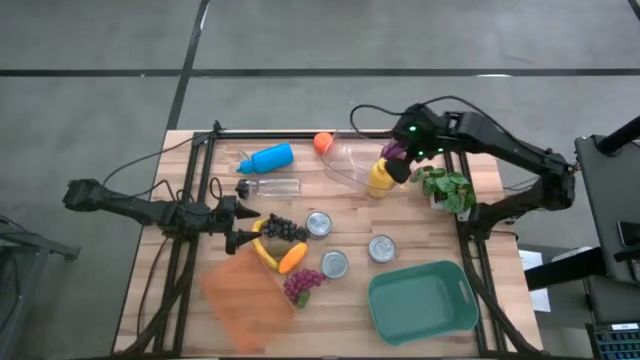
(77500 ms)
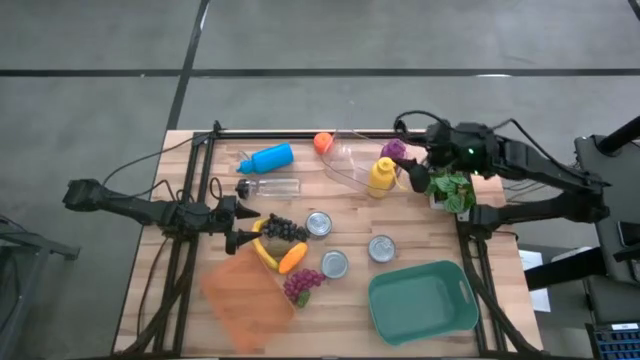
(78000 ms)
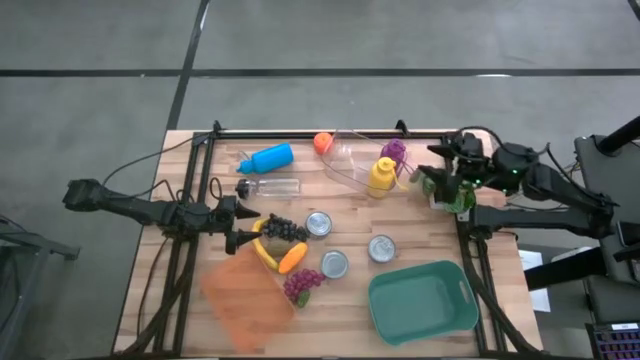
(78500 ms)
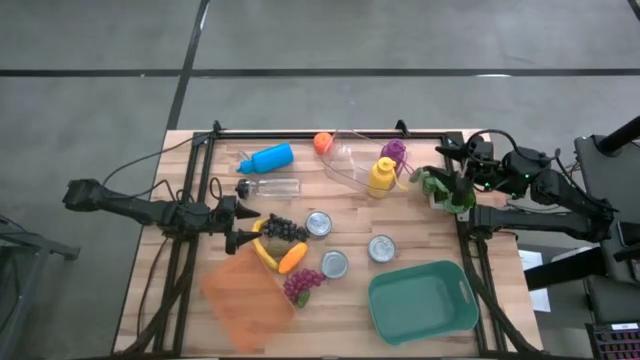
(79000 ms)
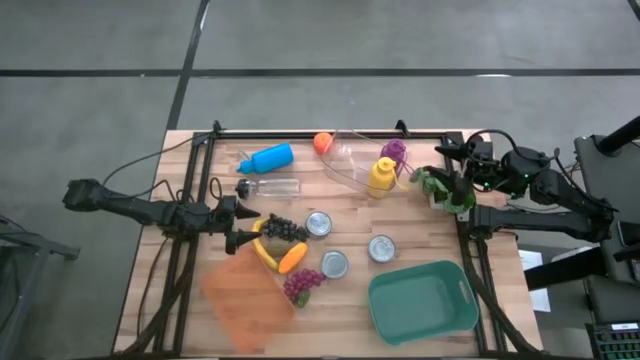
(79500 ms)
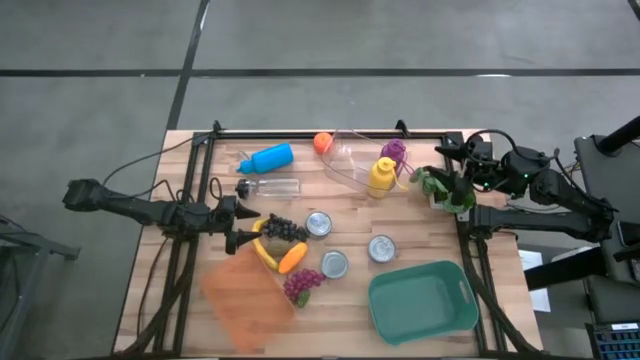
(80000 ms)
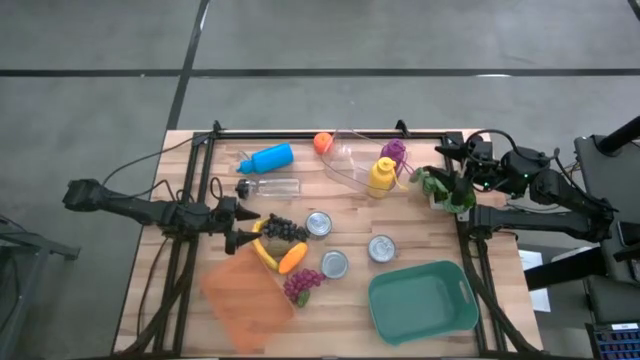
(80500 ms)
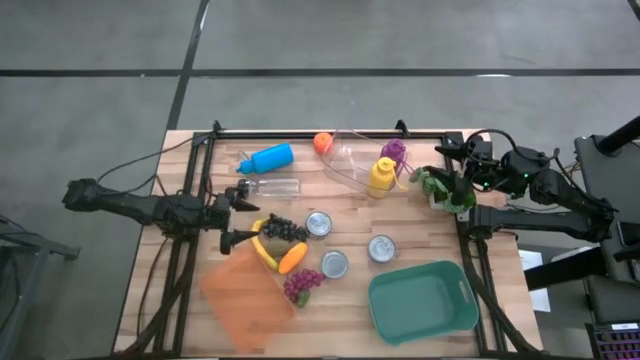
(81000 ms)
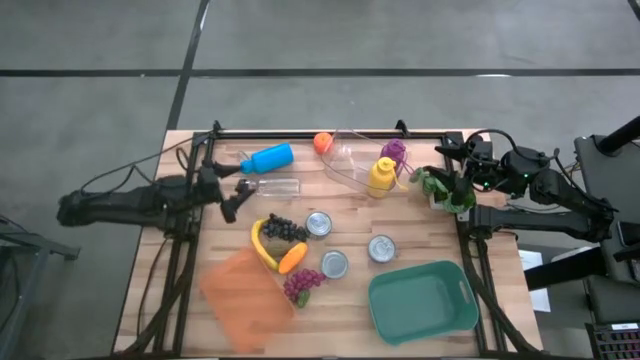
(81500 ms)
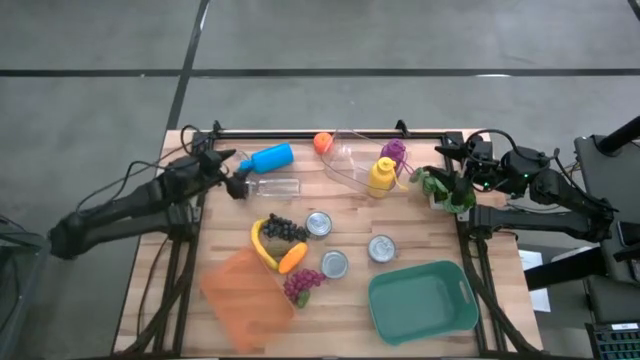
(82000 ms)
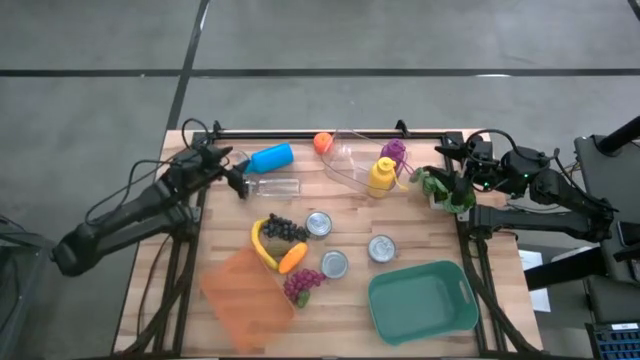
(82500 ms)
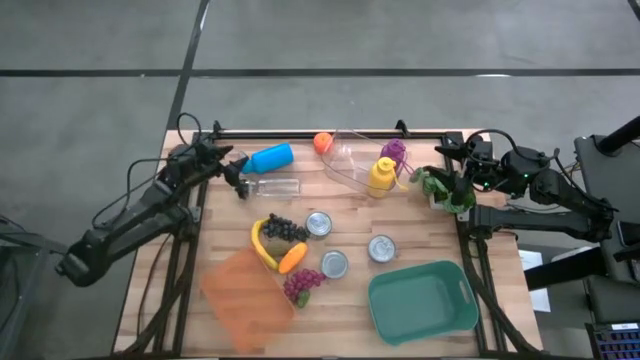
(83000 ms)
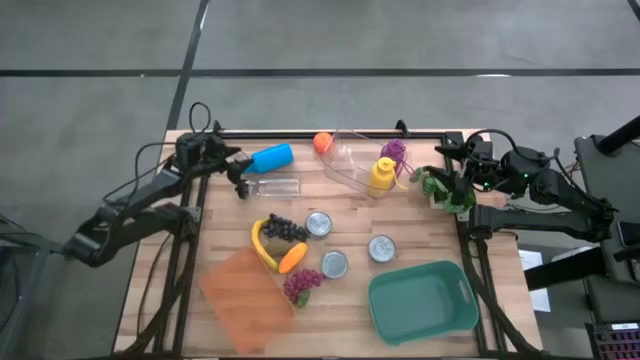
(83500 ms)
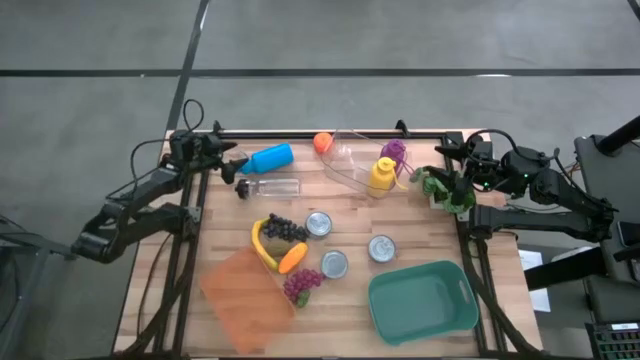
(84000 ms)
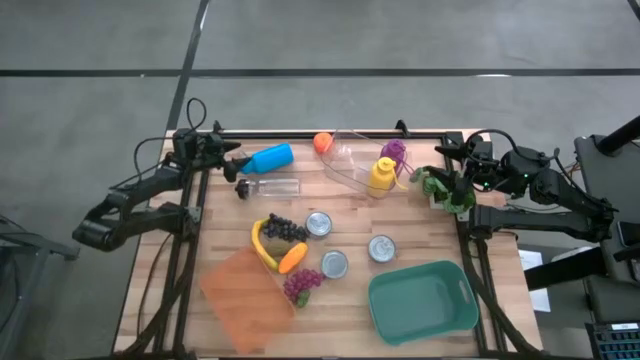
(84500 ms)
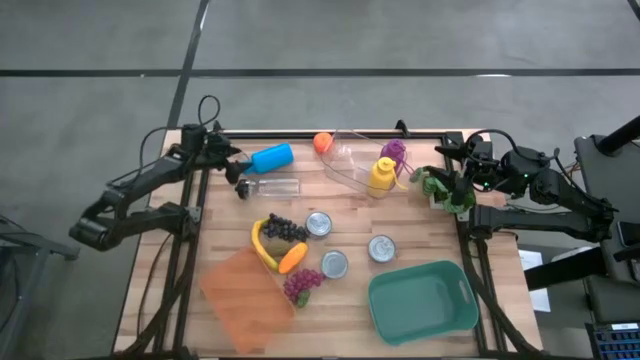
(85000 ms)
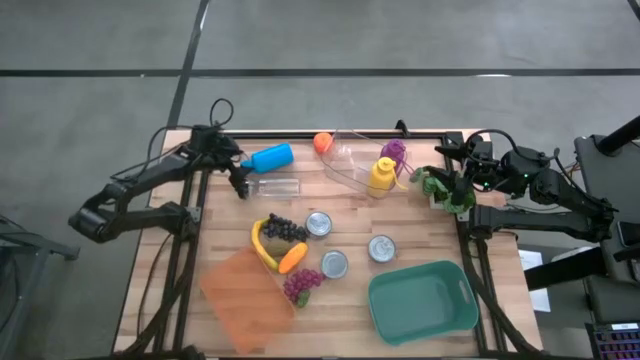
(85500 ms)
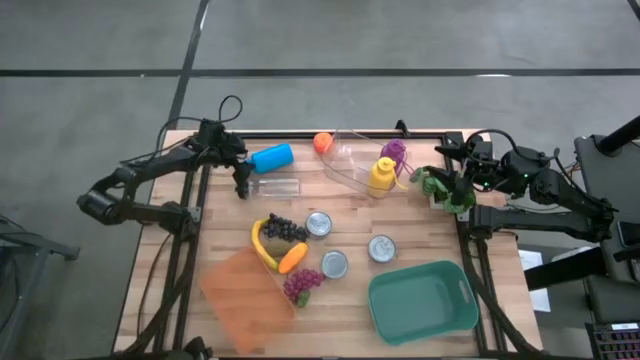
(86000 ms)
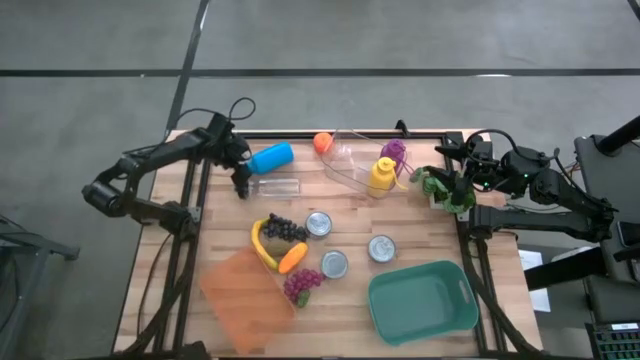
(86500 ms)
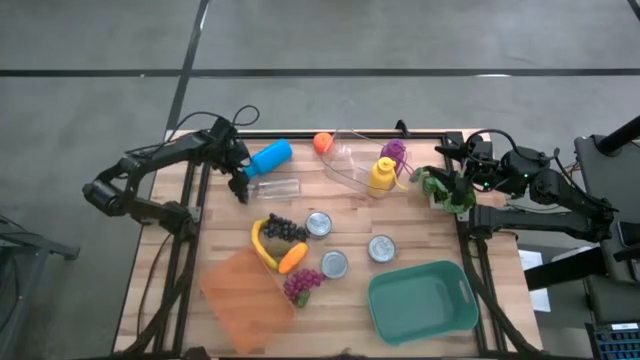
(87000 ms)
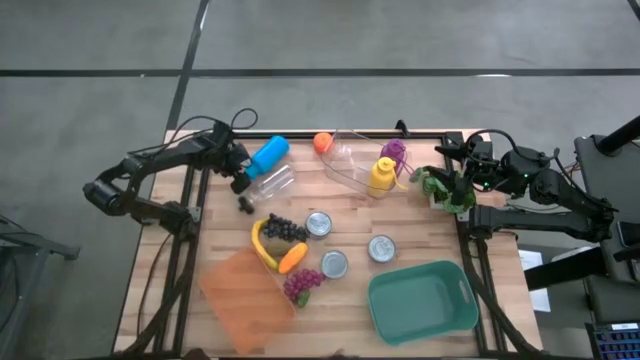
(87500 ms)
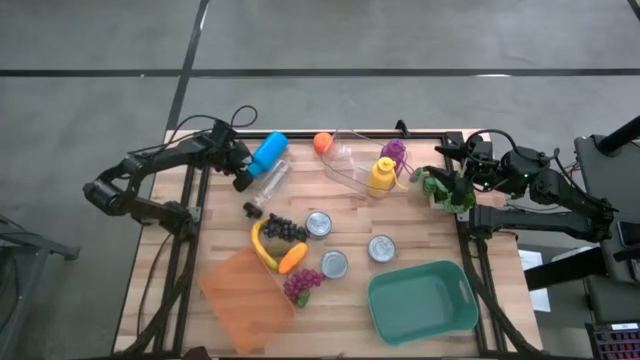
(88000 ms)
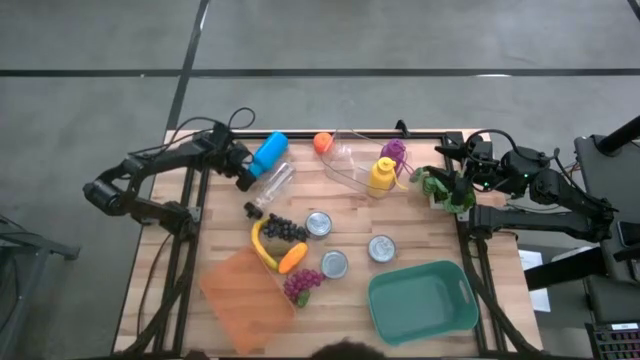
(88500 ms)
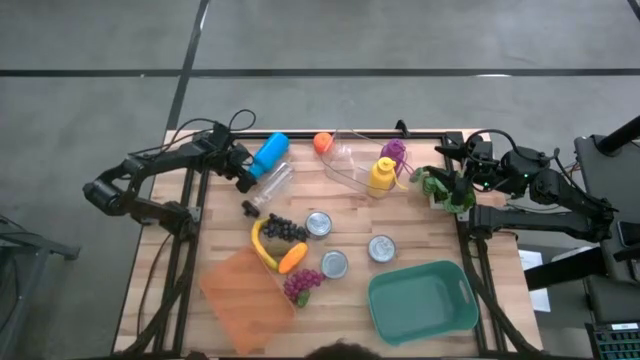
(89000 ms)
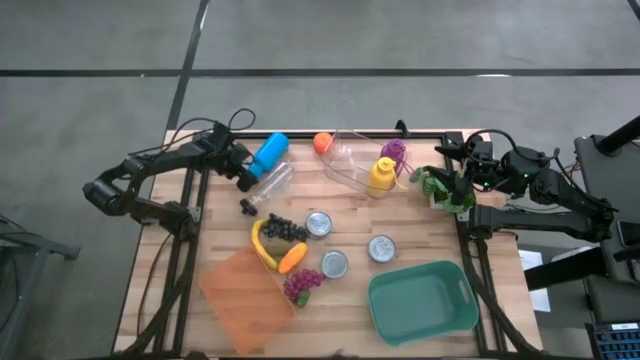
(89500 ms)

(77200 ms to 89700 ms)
Task: Pick & Place Food Item
Put the blue water bottle into the transparent bin

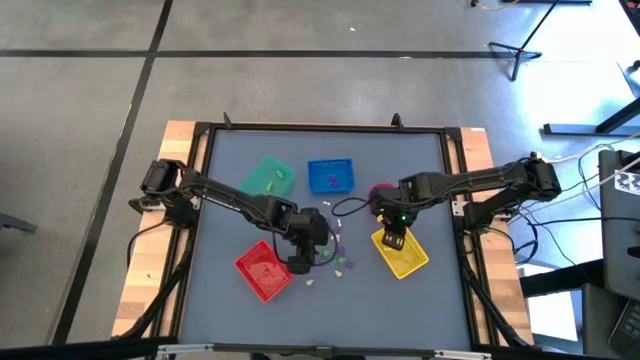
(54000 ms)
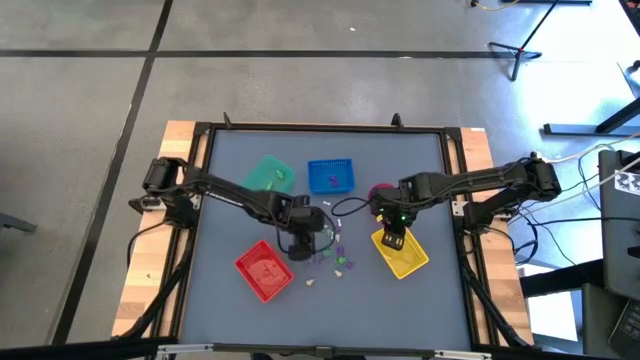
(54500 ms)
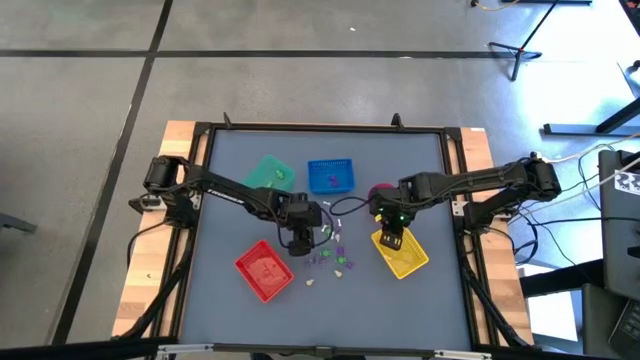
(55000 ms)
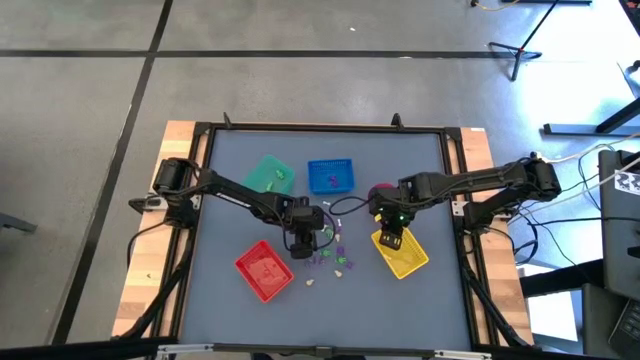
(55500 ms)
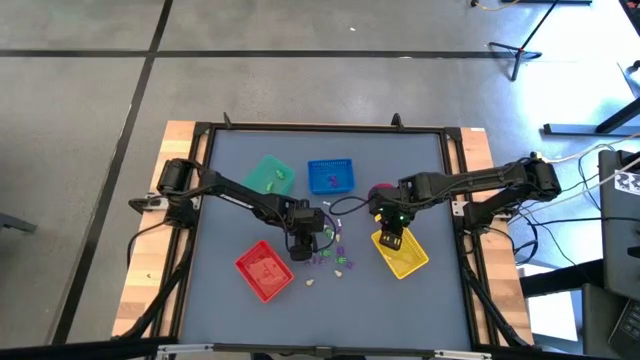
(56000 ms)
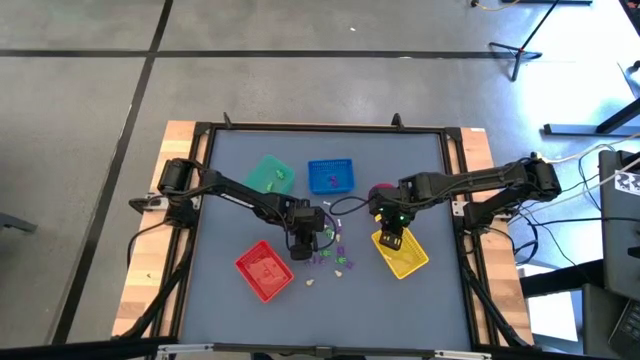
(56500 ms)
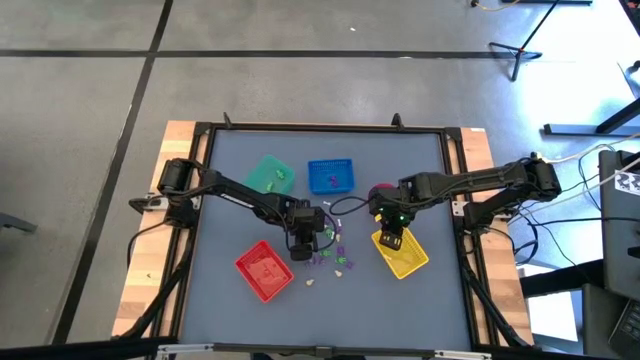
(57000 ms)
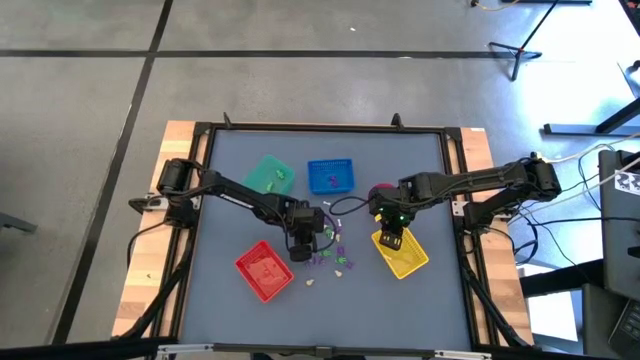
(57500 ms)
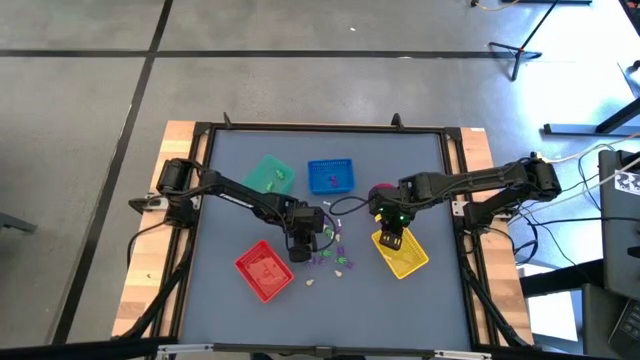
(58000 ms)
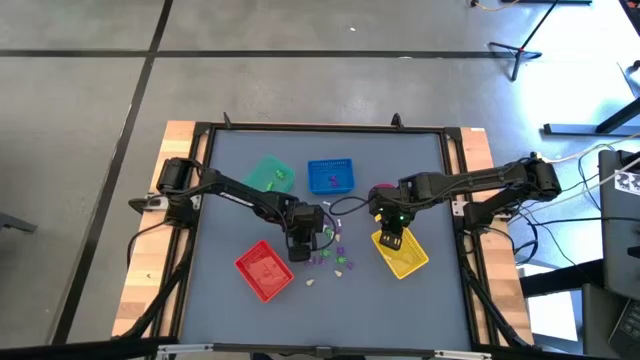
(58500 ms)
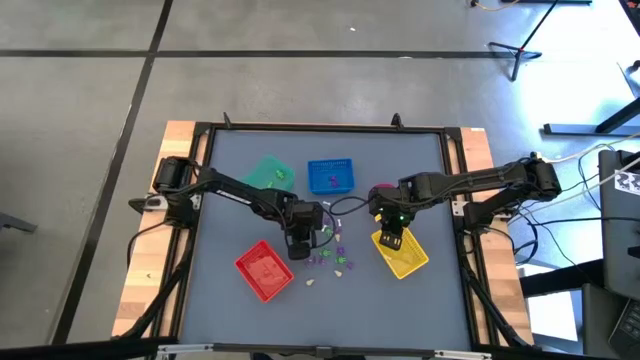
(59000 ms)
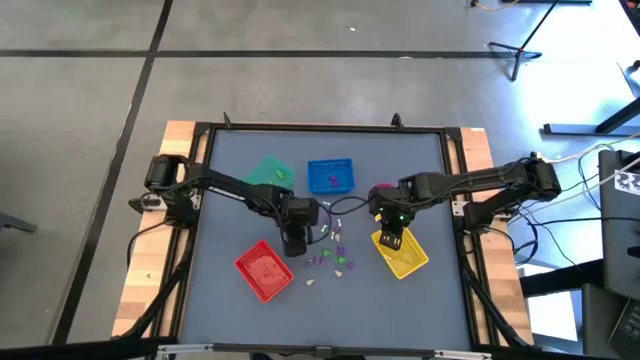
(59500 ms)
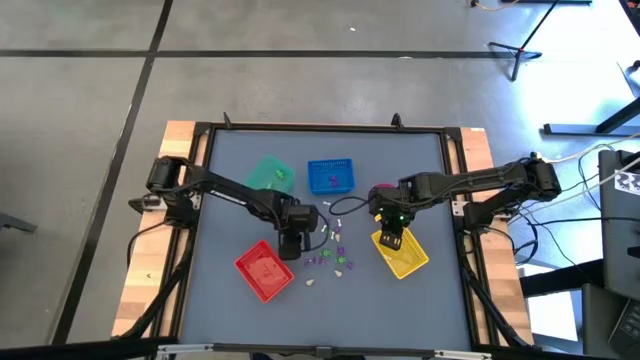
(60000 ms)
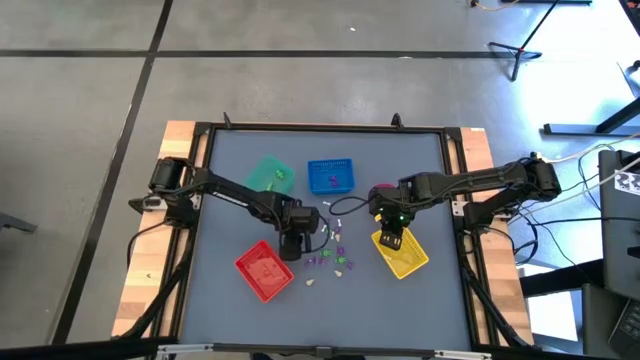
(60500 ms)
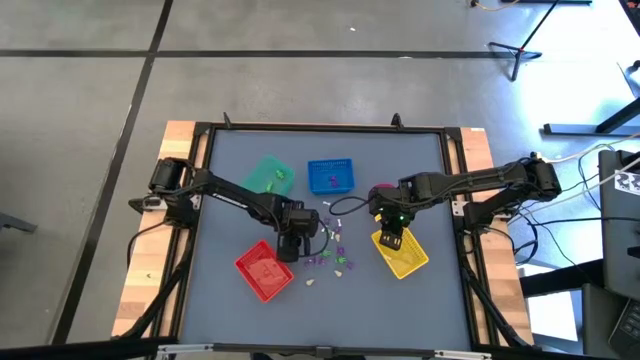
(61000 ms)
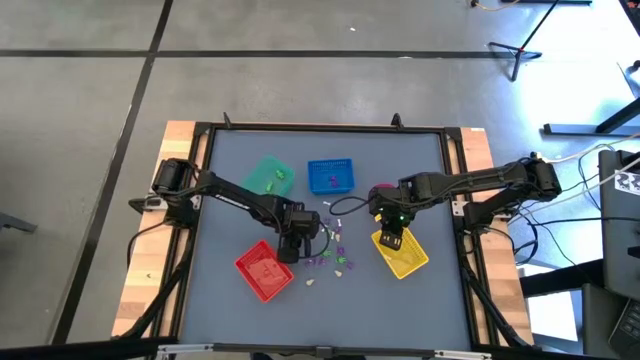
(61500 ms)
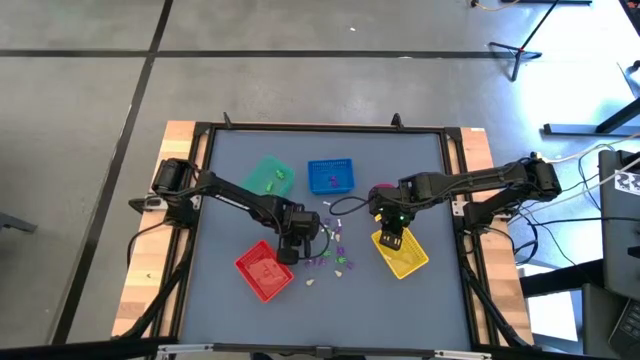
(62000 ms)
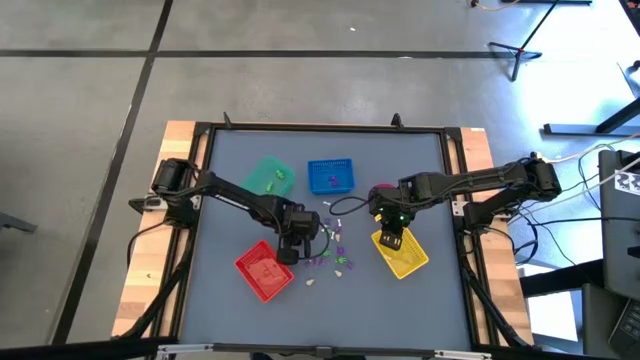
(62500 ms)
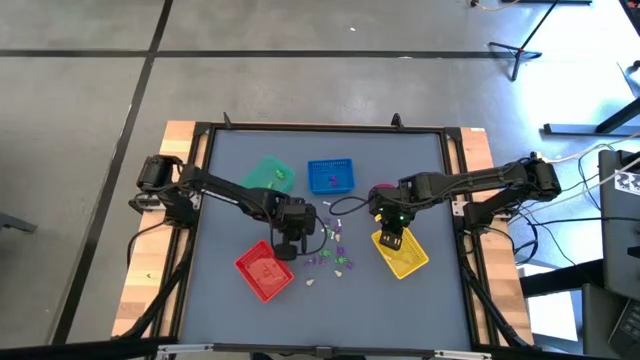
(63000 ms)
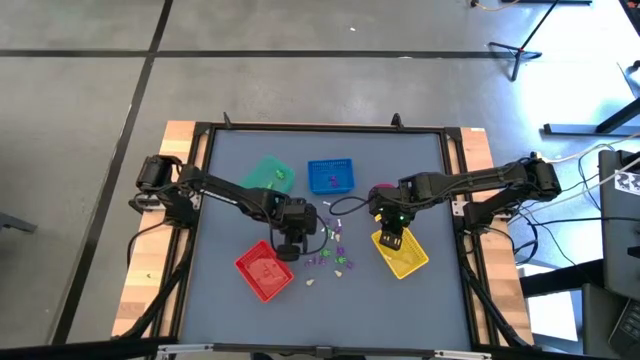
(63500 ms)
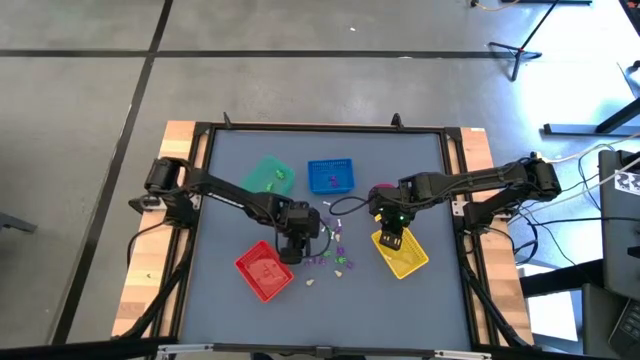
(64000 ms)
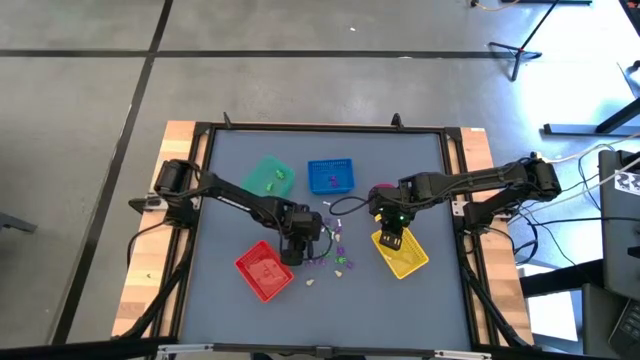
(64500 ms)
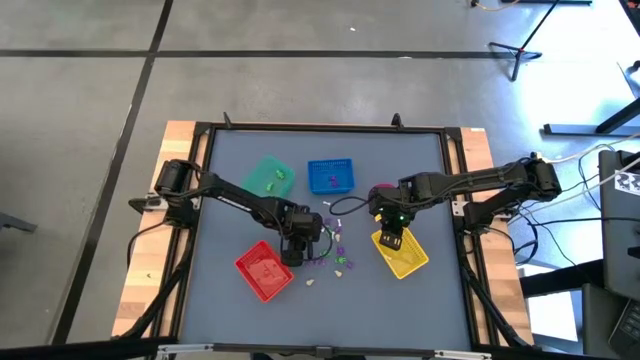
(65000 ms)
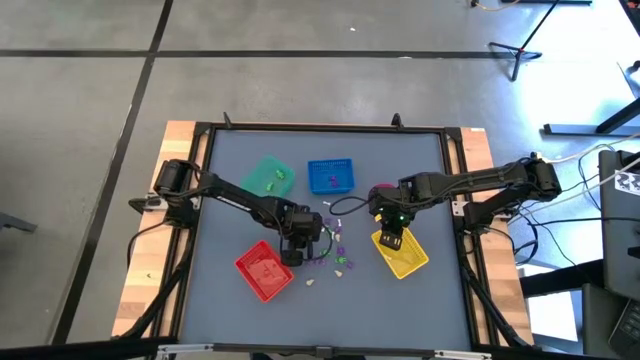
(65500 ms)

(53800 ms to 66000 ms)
Task: Sort Halloween decoration
Put the purple witch hat toy into the orange bin
